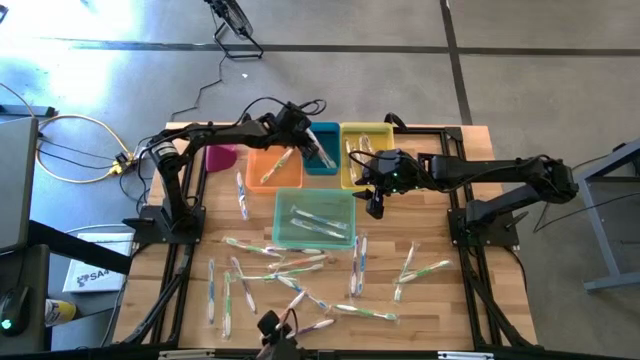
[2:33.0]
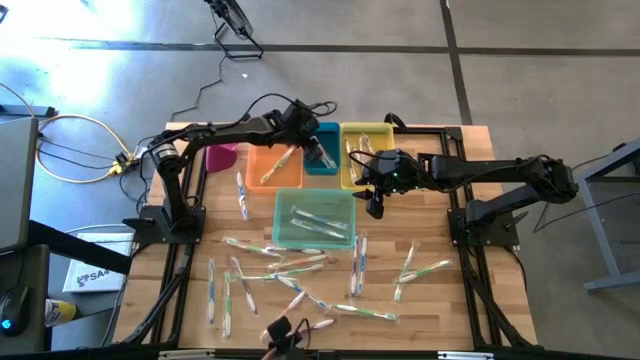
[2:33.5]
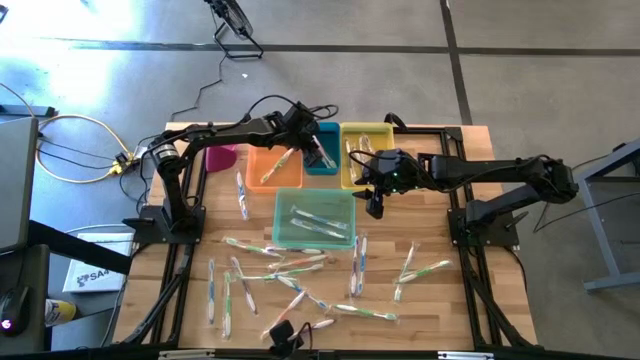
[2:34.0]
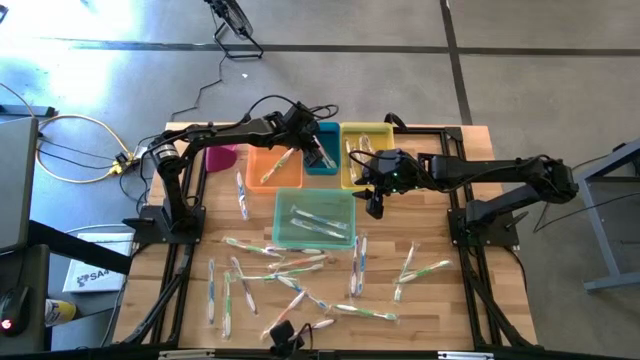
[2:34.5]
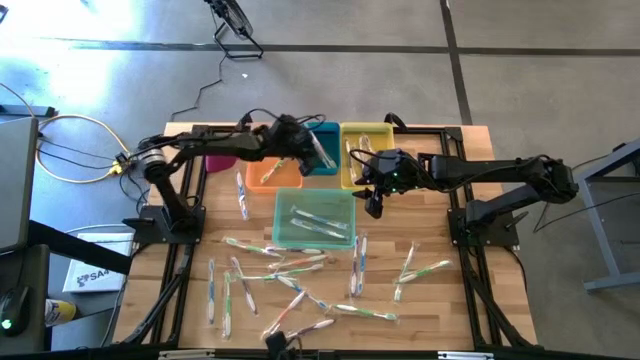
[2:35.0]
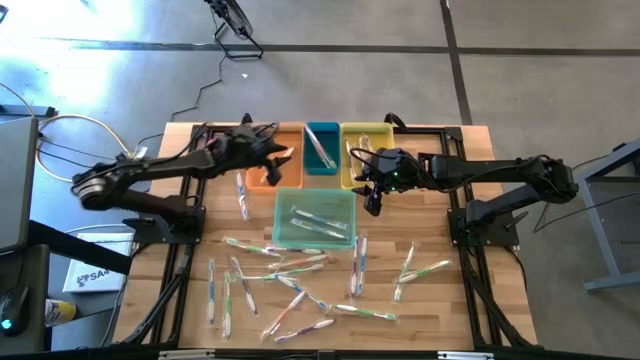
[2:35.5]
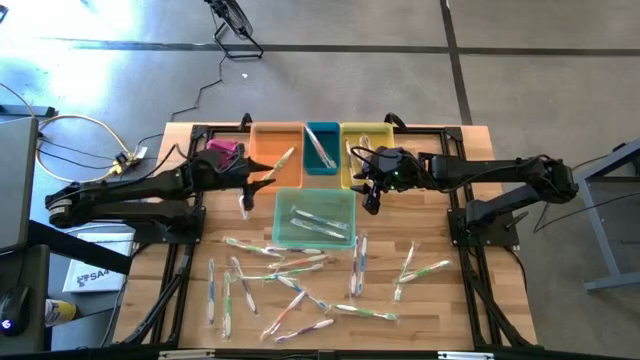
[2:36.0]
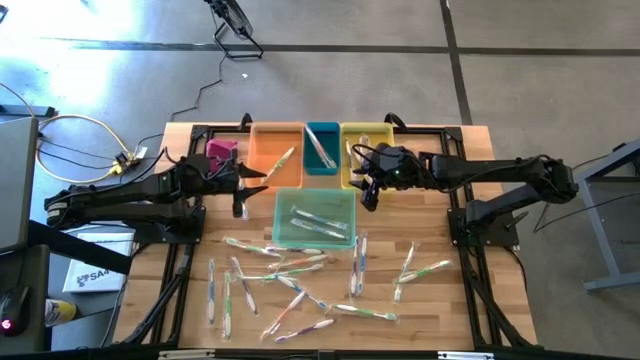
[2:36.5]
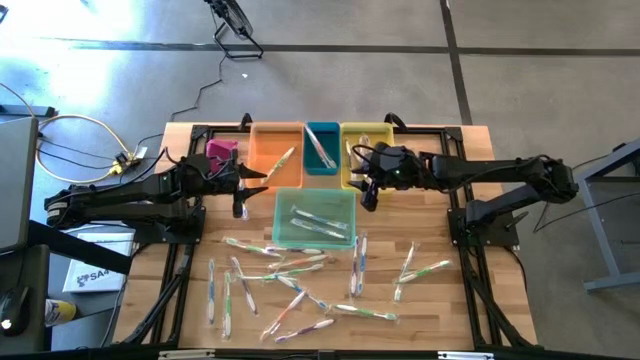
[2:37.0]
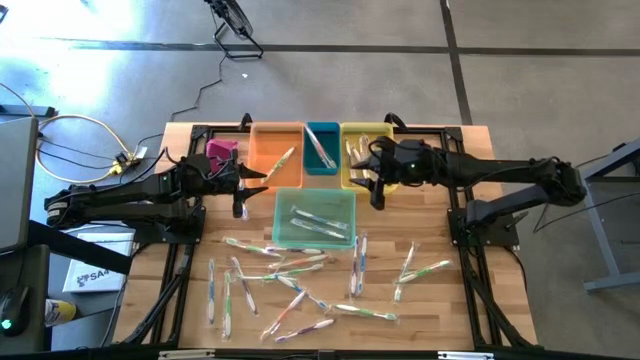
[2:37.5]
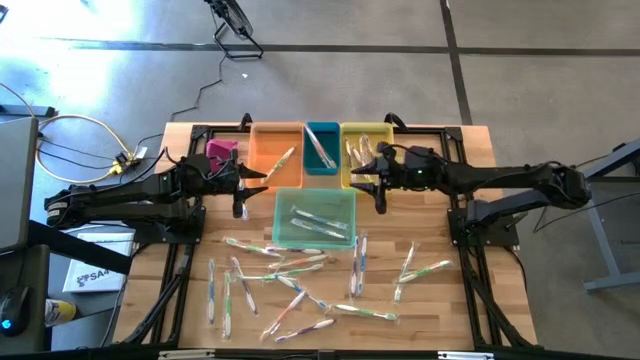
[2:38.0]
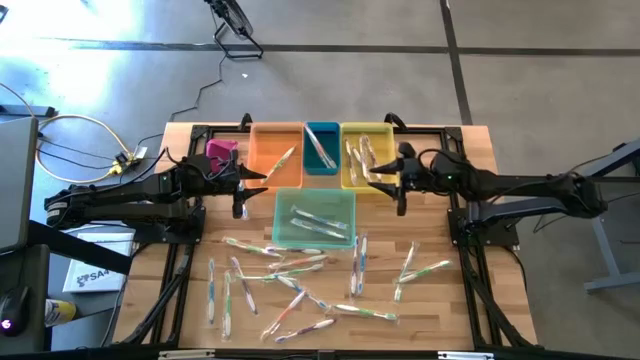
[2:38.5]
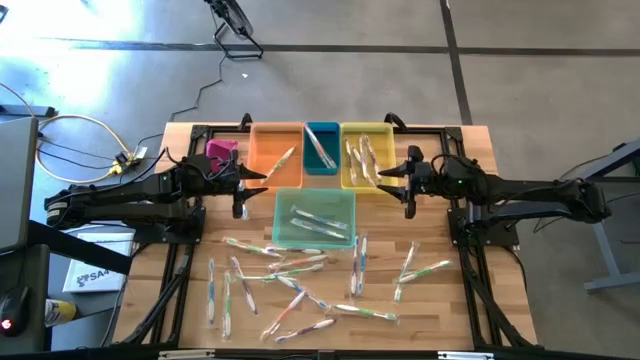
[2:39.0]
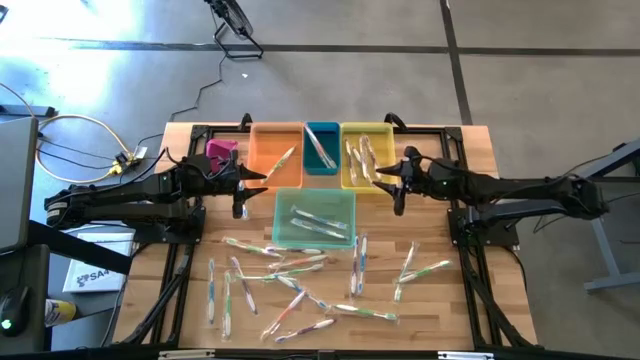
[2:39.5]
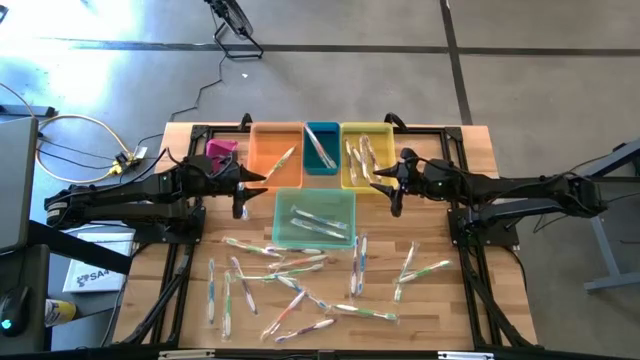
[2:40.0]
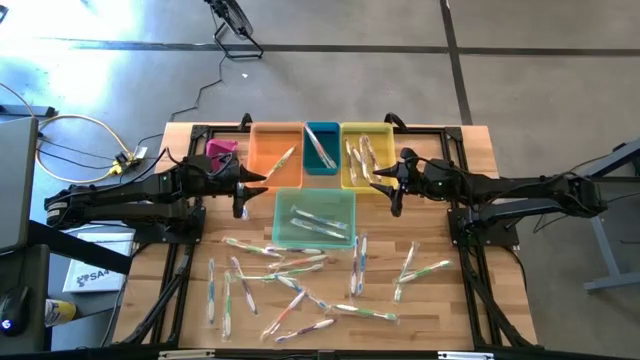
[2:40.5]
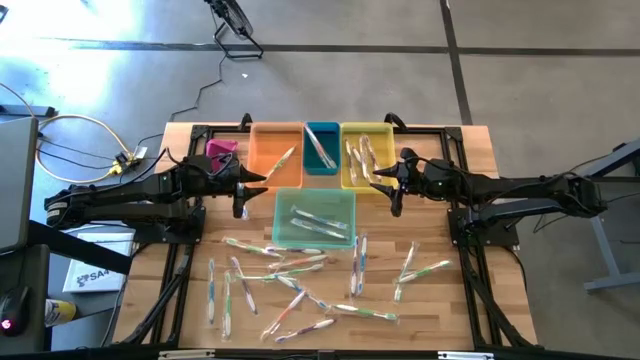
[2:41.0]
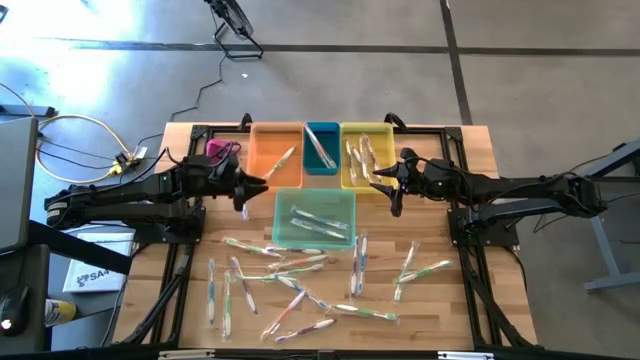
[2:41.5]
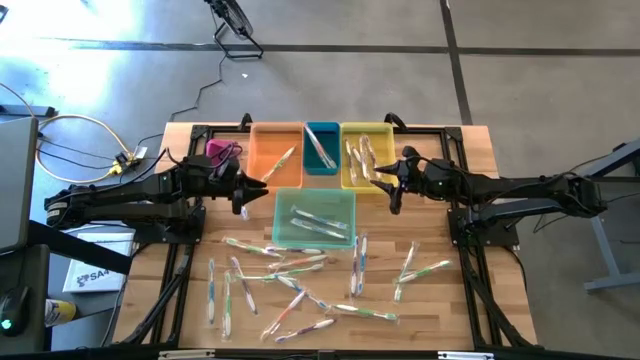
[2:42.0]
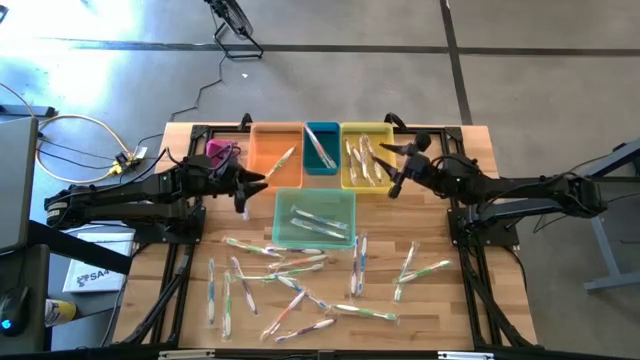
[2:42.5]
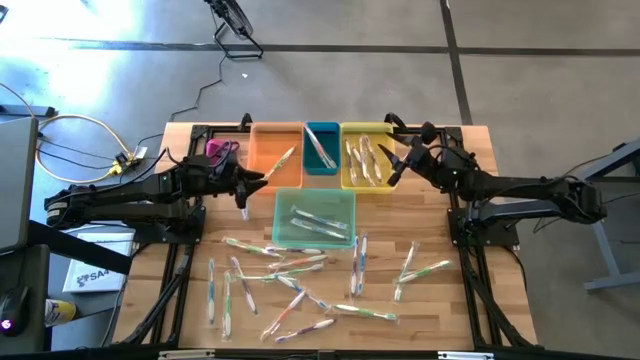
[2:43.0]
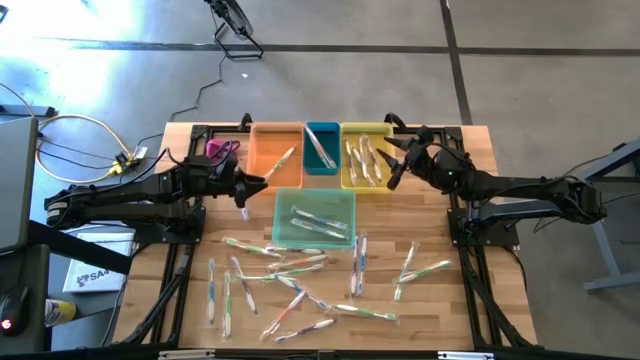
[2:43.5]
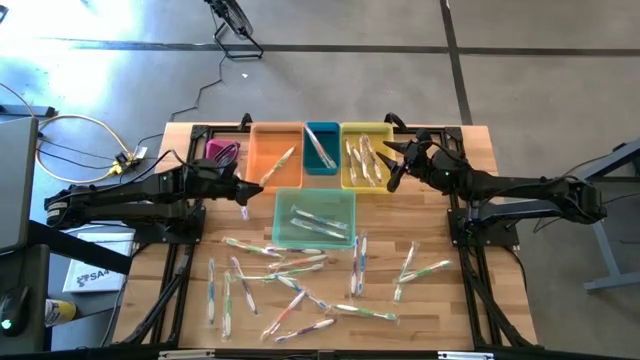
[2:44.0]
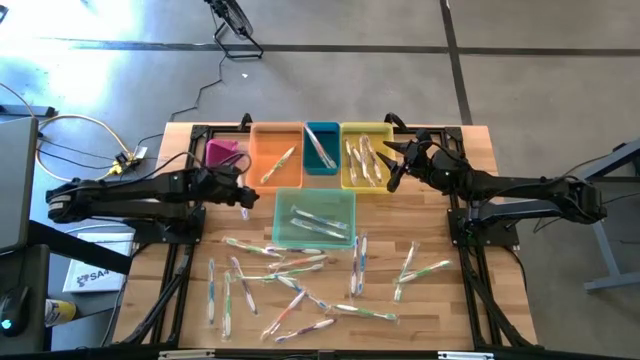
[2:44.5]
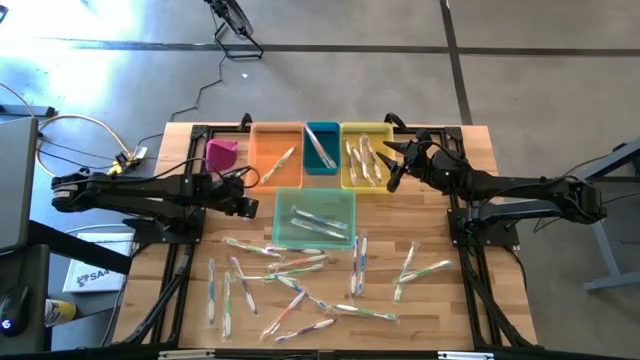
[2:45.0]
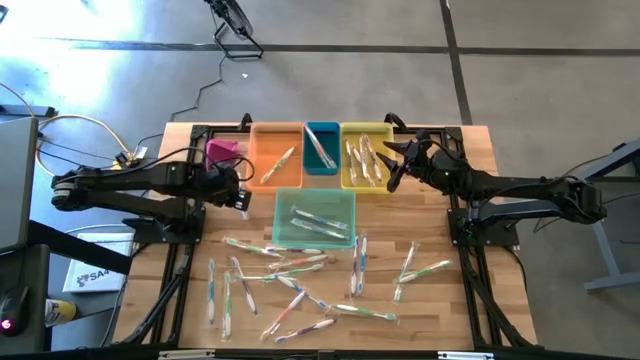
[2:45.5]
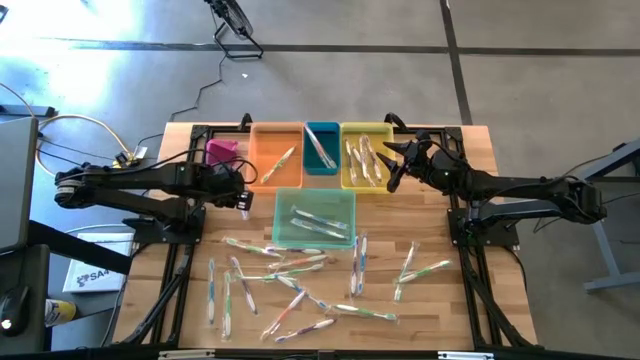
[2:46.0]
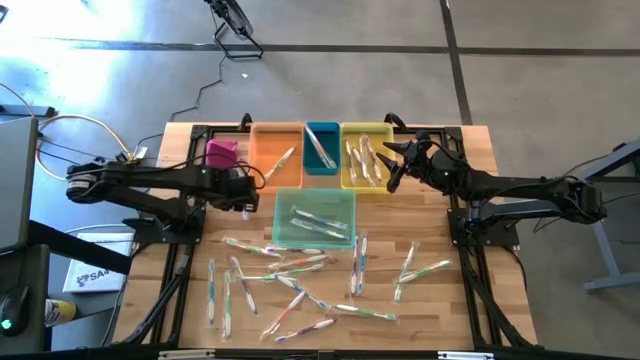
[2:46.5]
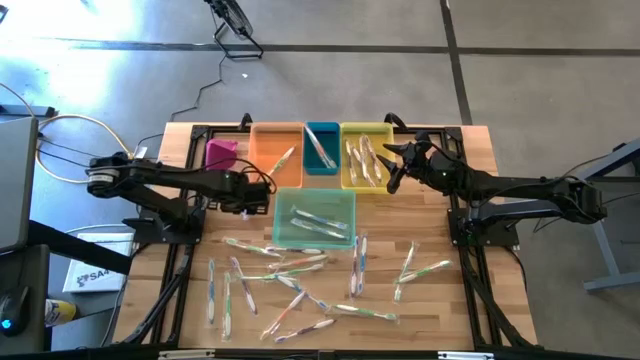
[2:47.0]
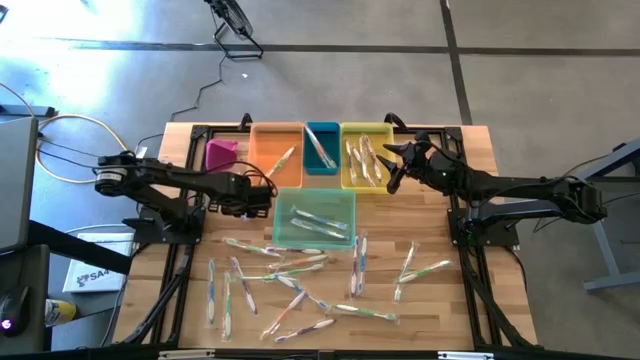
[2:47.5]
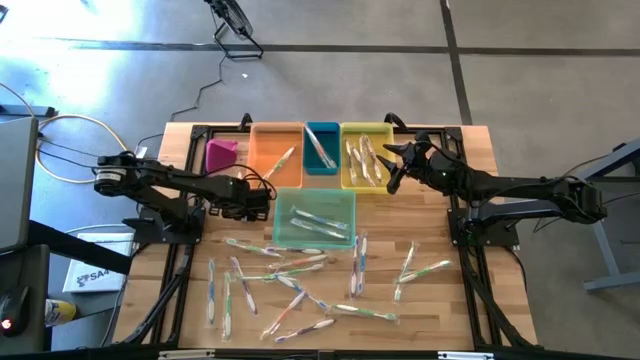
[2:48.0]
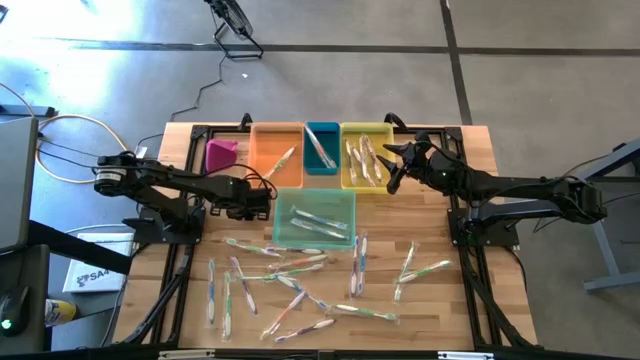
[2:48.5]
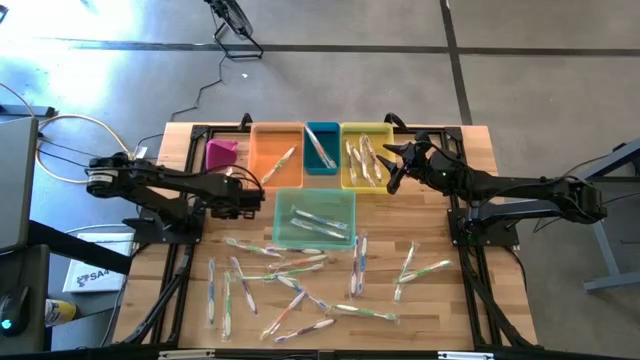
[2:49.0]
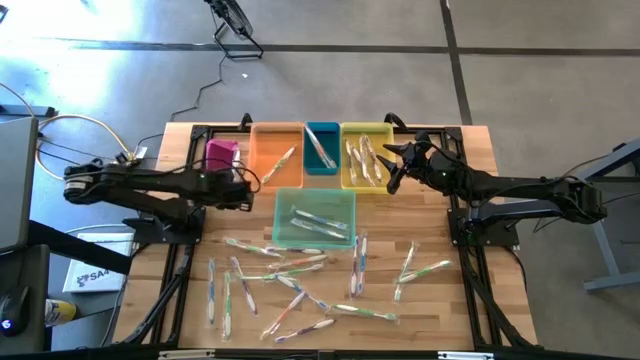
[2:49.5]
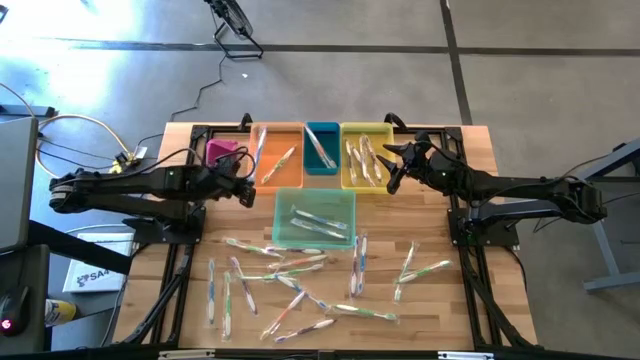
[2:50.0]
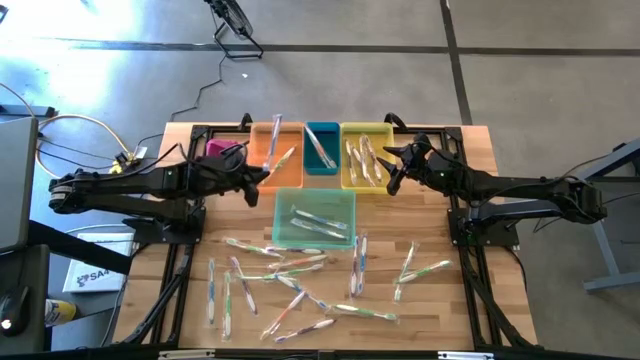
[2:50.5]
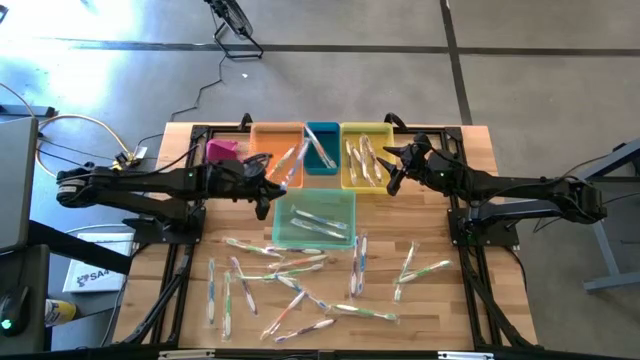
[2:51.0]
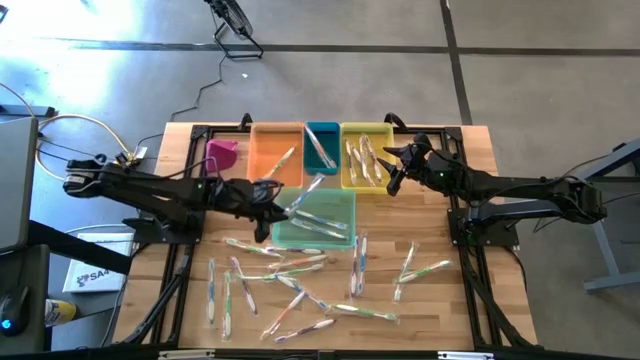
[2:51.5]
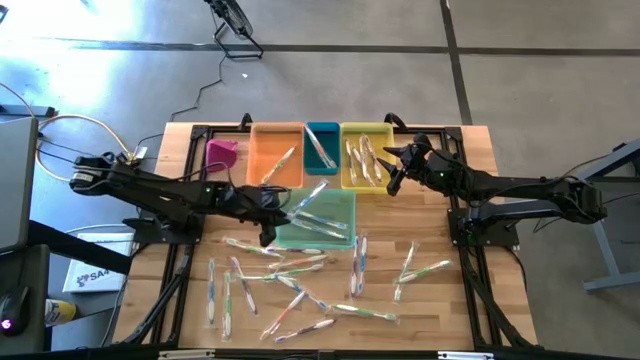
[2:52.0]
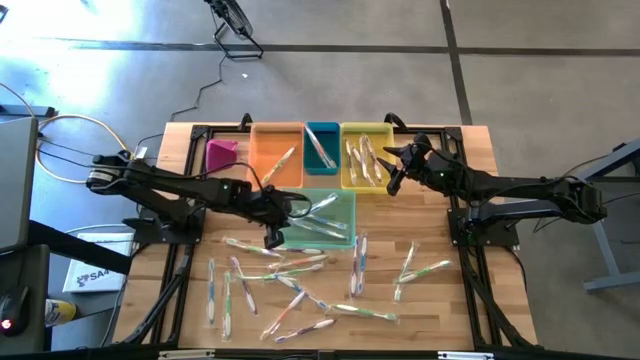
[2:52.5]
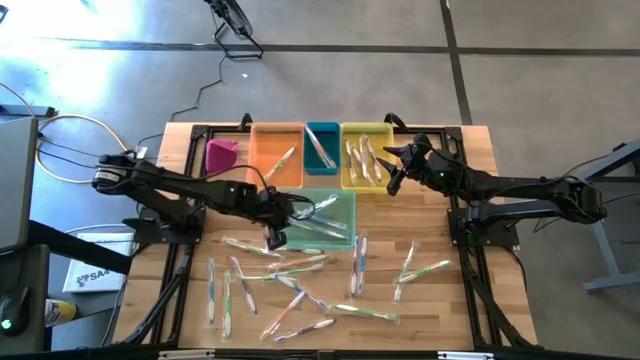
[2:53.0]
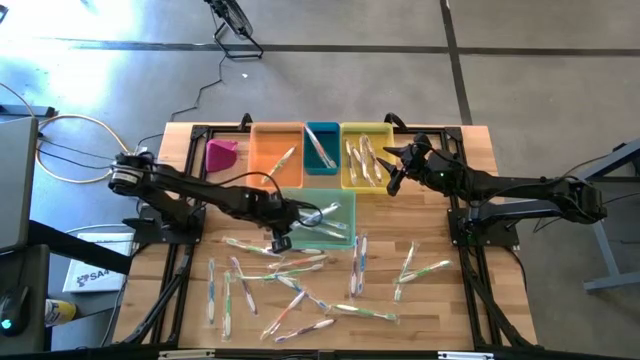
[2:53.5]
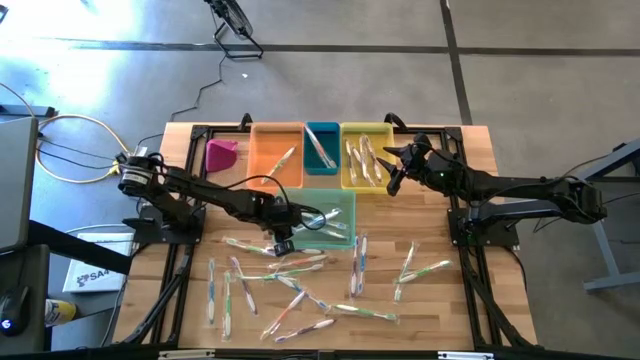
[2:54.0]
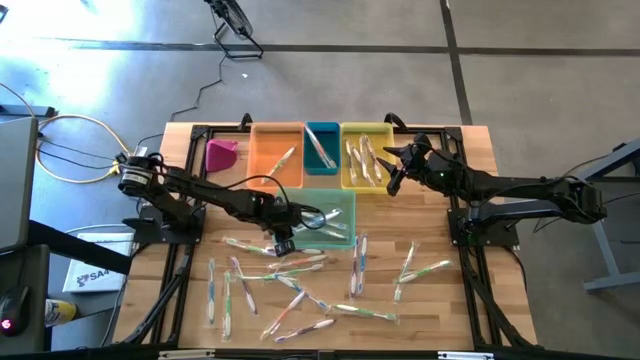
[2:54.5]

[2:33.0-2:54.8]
Task: Pick & Place Toothbrushes
Put the blue toothbrush into the green bin
